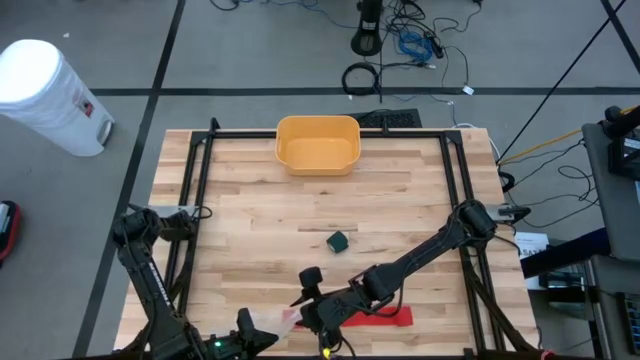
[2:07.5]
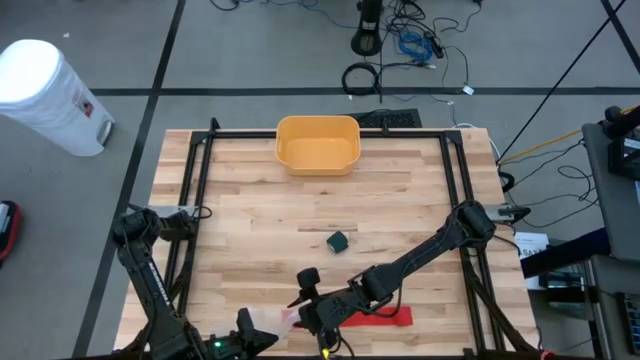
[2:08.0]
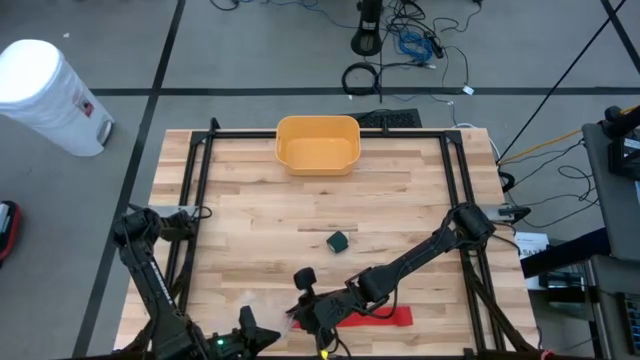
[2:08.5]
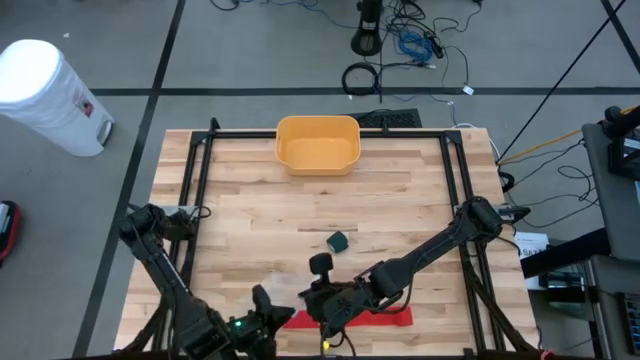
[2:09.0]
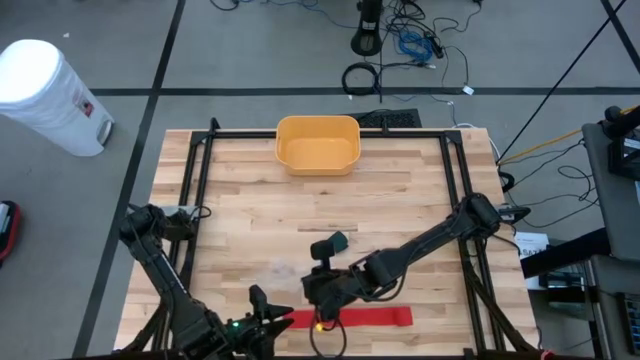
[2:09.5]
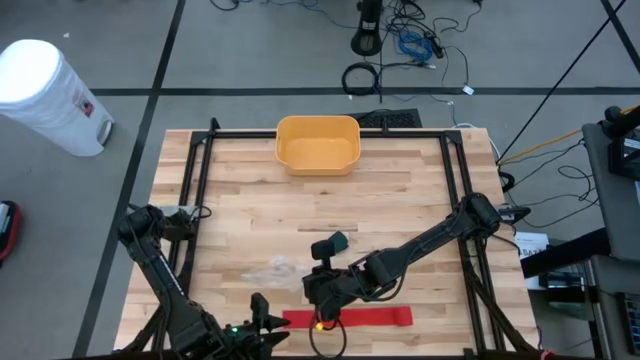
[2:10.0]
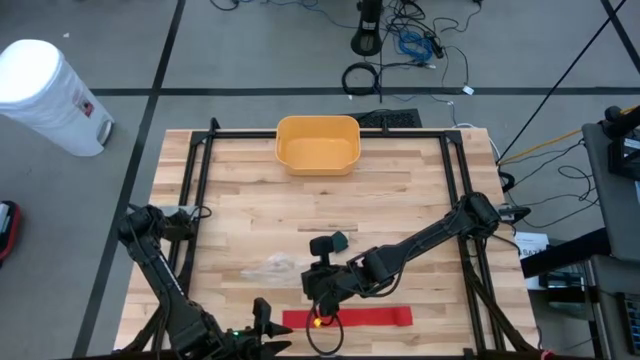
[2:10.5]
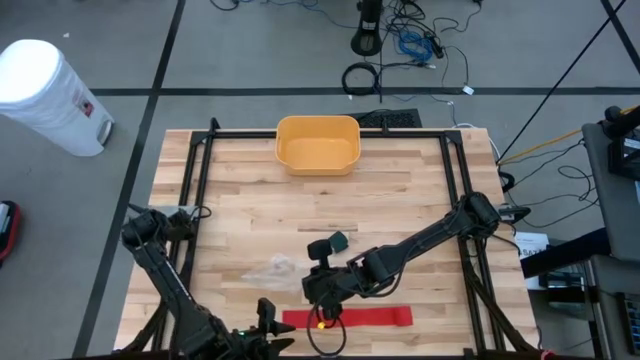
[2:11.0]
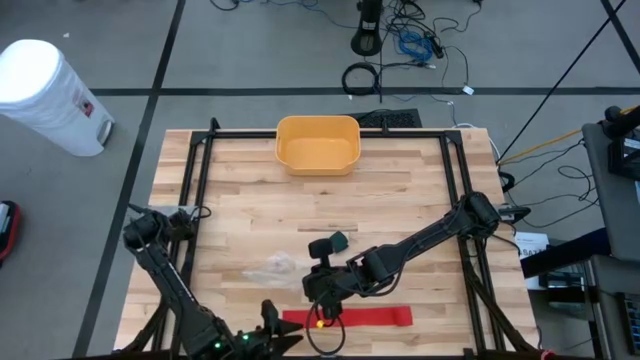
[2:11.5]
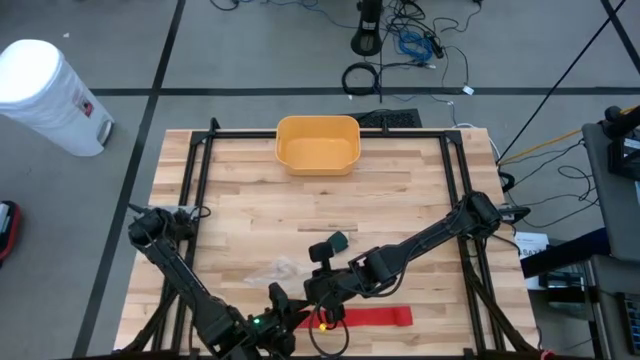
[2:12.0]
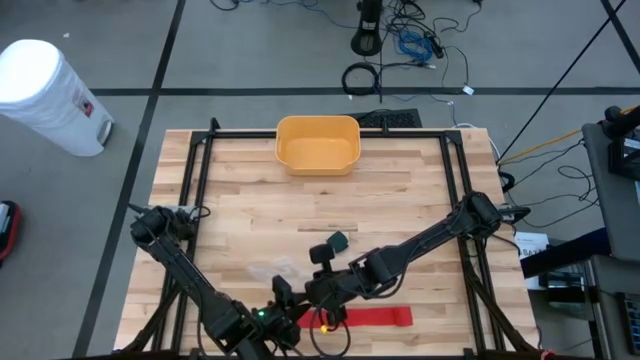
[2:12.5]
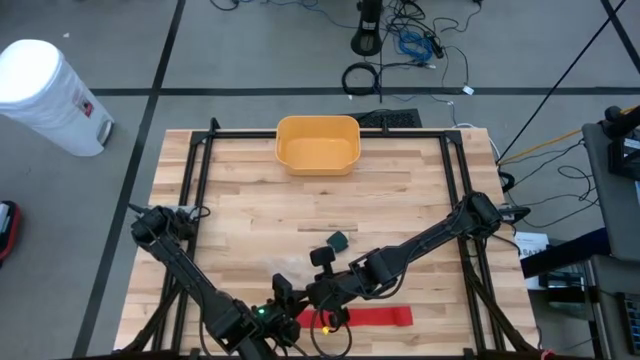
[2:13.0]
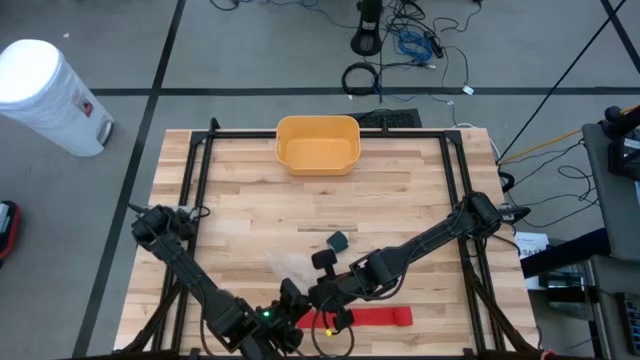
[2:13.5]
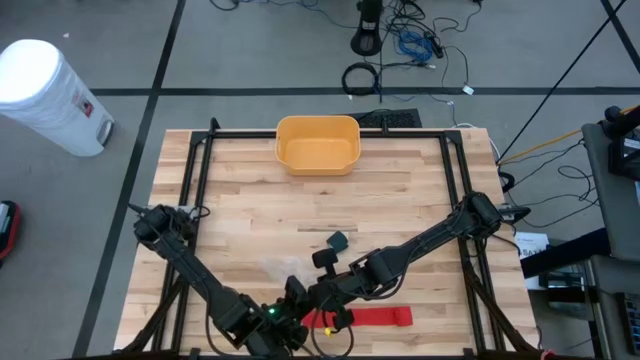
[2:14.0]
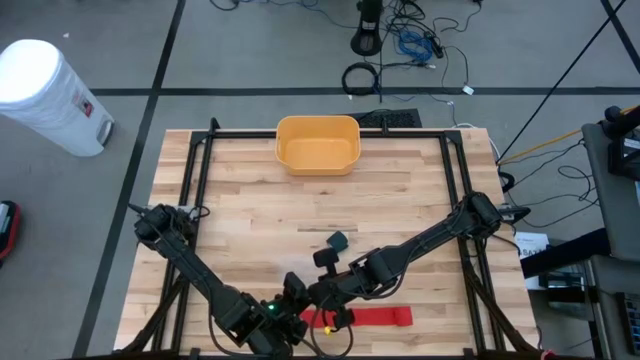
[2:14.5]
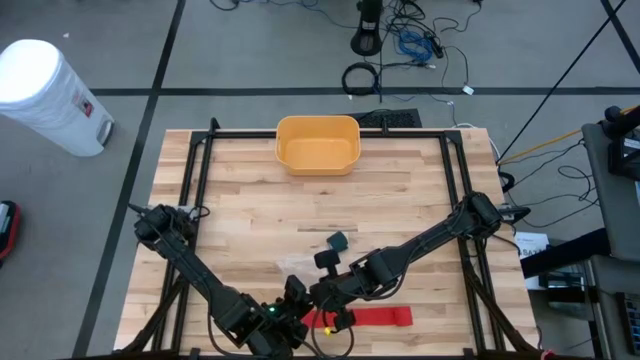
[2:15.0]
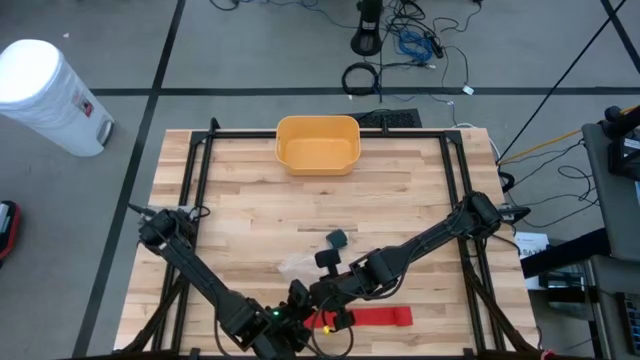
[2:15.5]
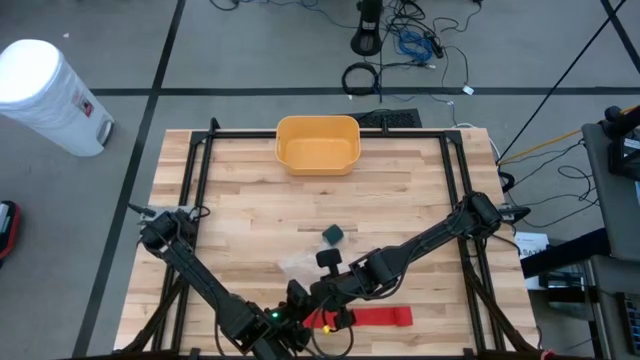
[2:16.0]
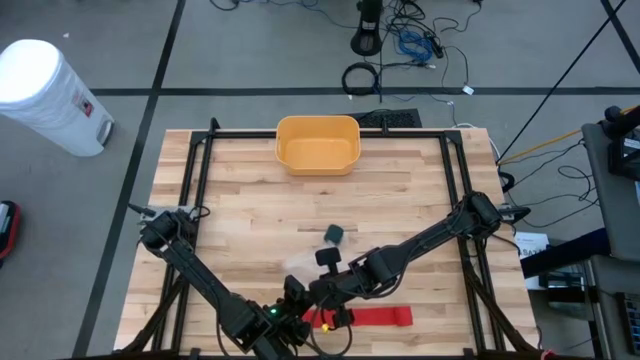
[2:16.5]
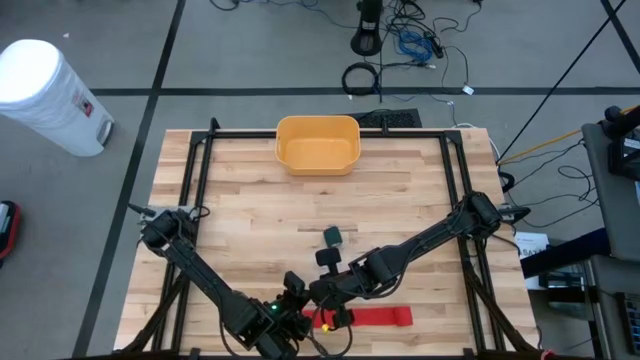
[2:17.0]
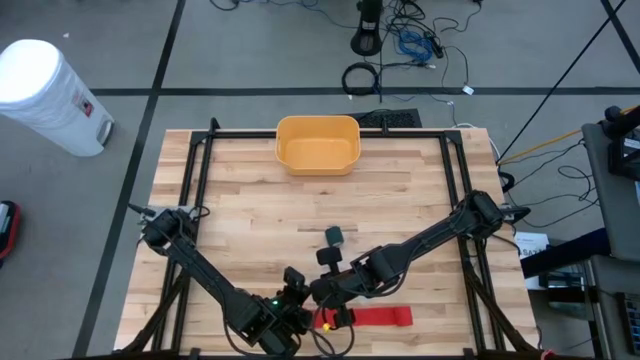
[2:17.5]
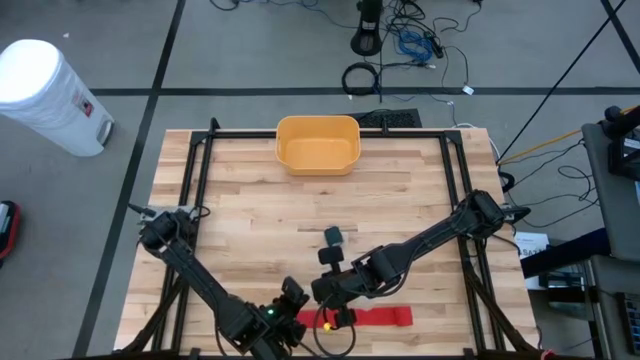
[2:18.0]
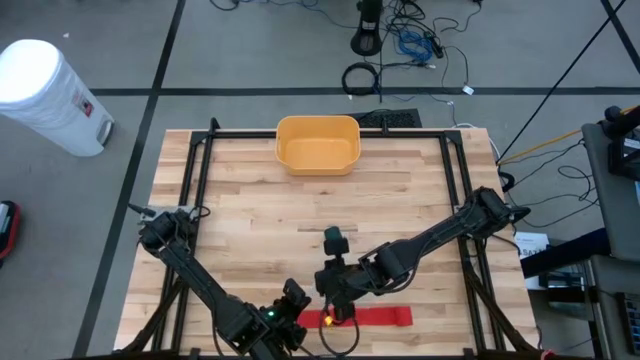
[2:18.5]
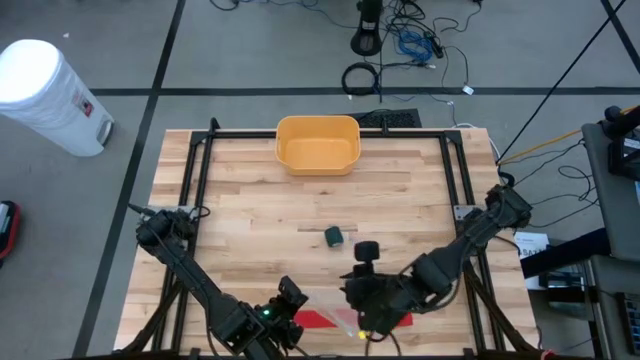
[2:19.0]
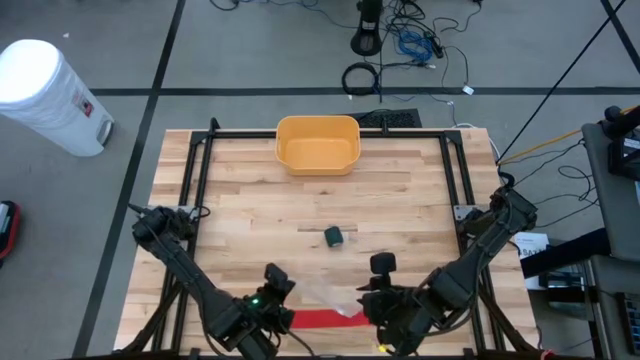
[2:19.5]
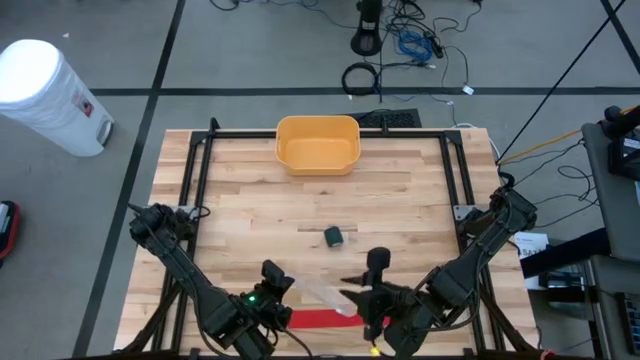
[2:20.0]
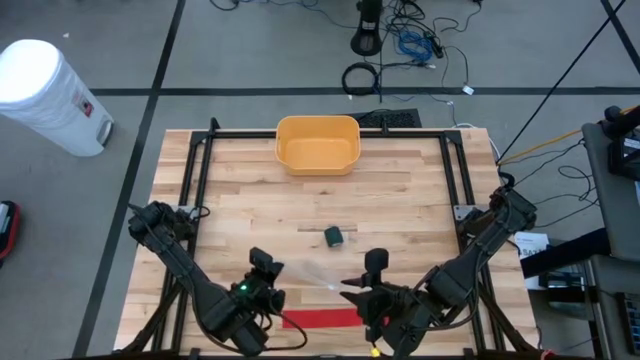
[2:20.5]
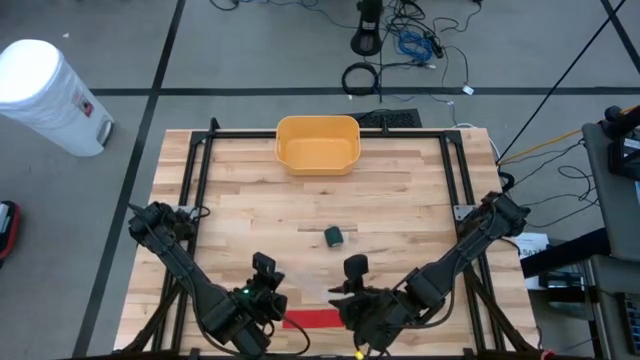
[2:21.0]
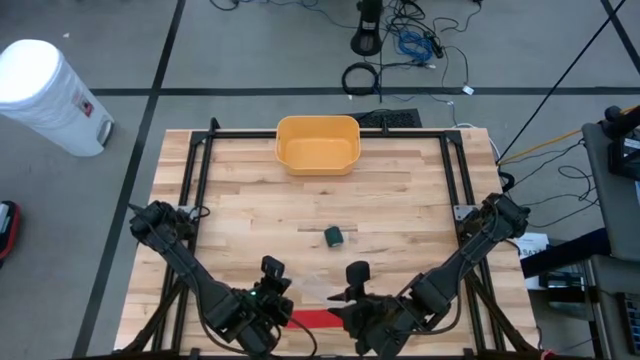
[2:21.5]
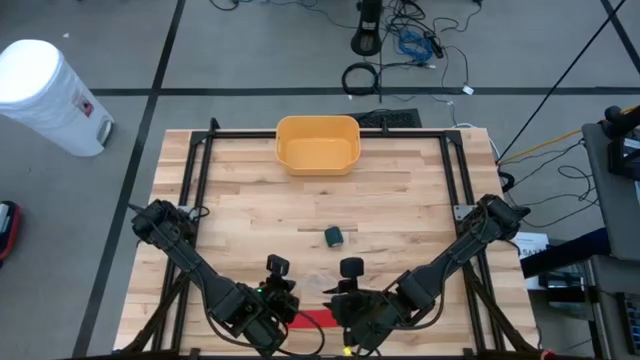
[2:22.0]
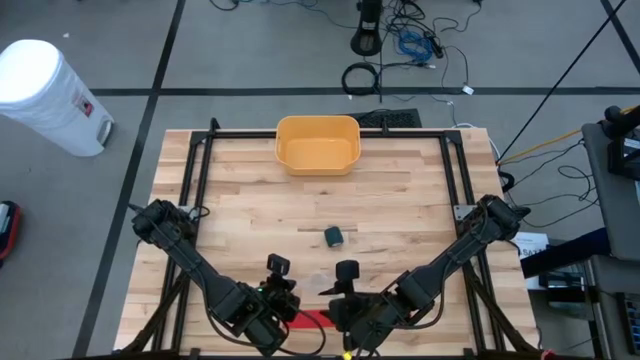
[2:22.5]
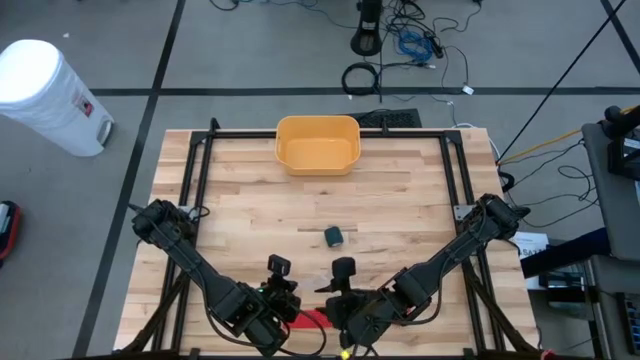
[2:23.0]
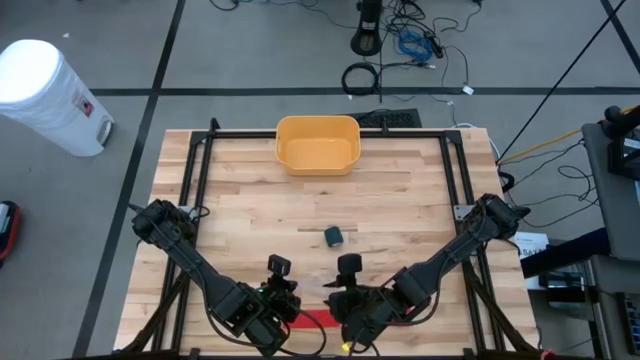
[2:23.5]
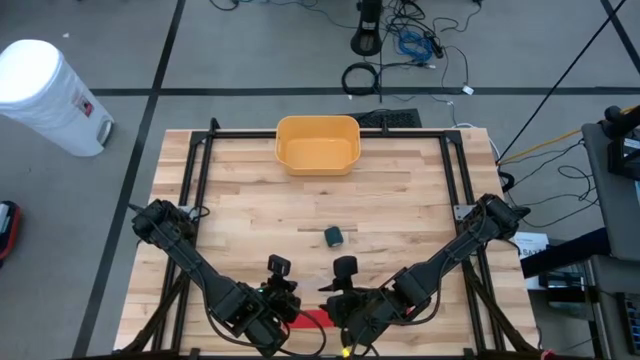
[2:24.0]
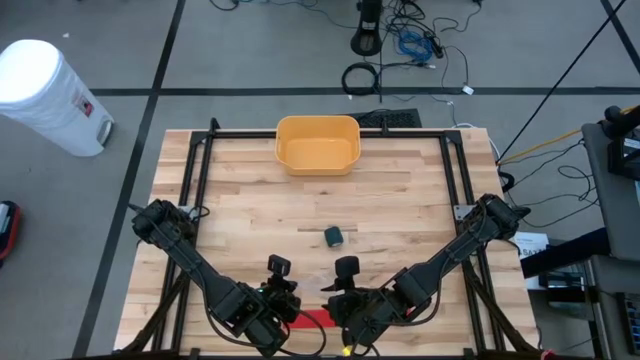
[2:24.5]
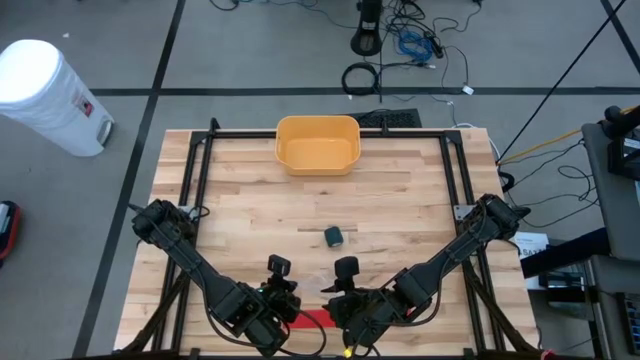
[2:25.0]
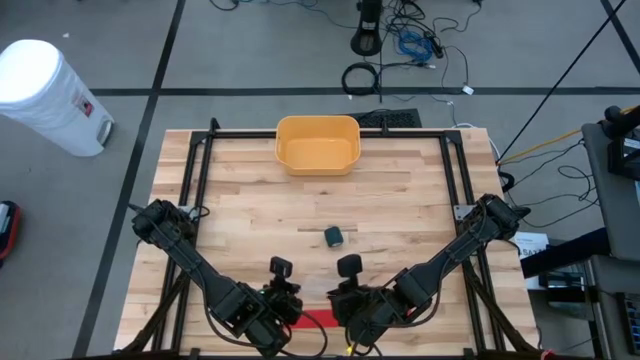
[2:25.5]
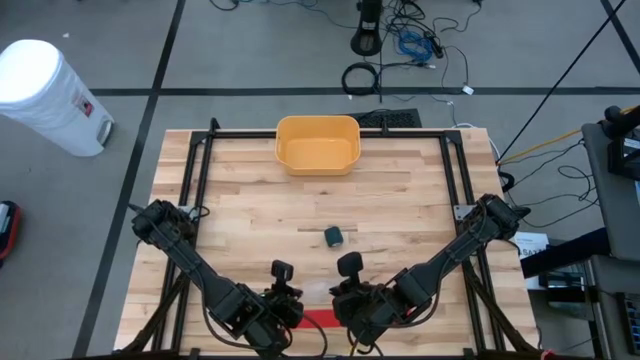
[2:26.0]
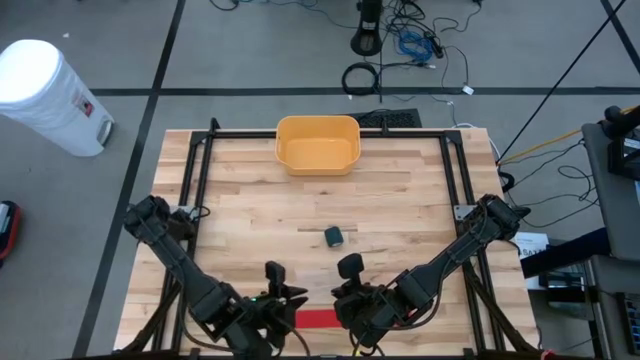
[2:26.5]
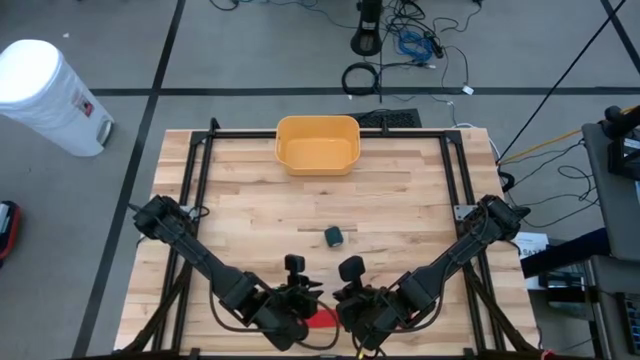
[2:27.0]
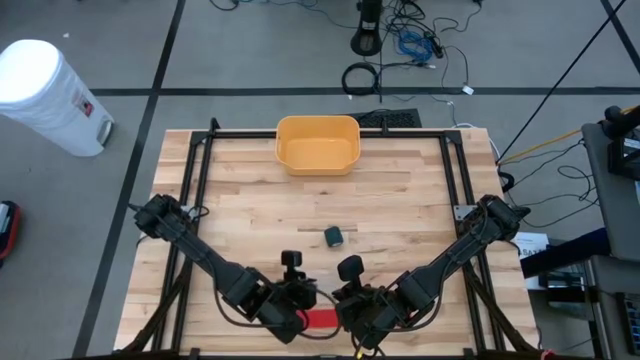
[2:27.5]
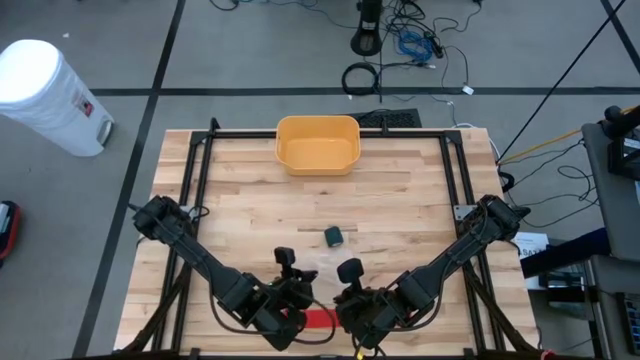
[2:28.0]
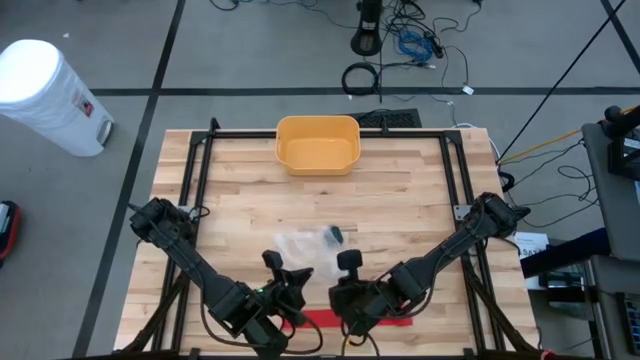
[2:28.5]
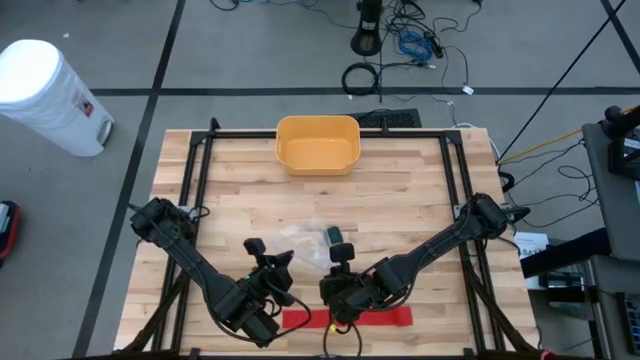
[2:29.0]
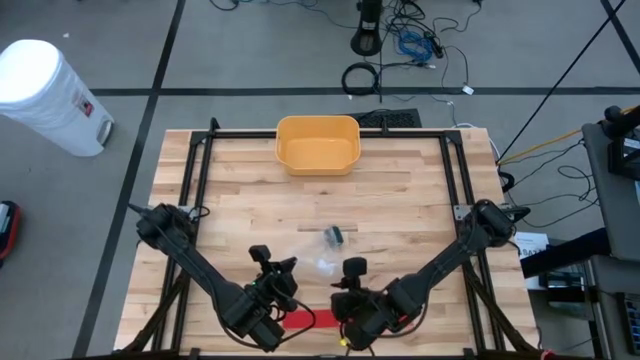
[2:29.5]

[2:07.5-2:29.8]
Task: Roll bandage
Open the transparent zip bag
